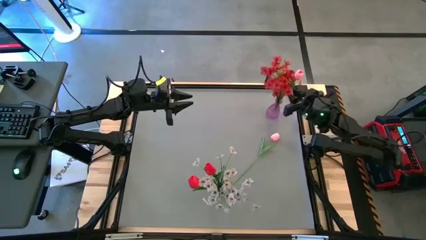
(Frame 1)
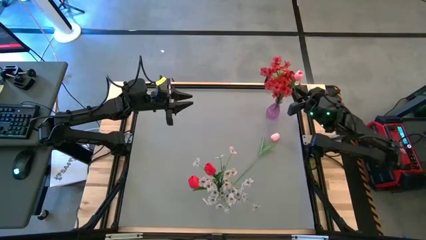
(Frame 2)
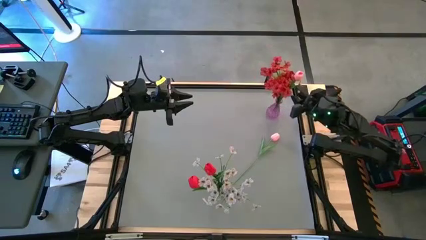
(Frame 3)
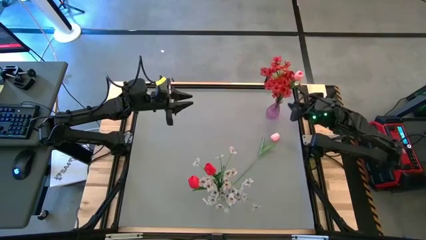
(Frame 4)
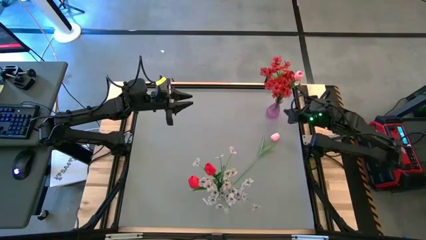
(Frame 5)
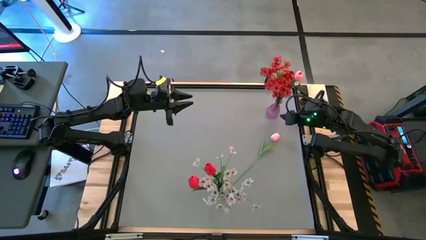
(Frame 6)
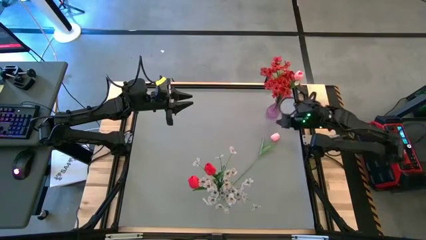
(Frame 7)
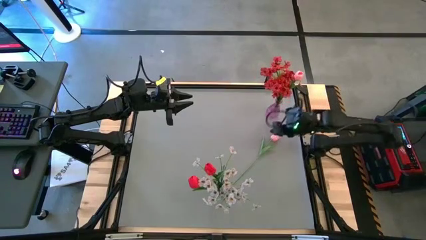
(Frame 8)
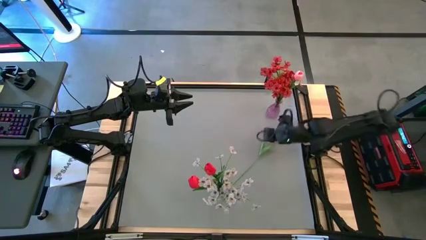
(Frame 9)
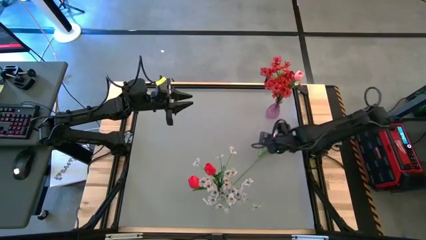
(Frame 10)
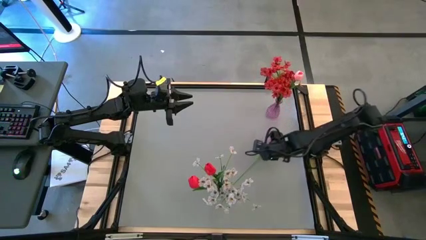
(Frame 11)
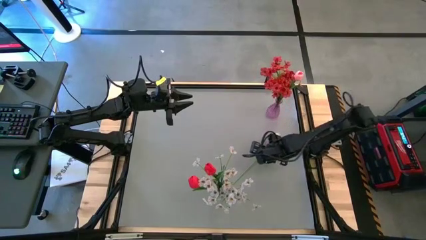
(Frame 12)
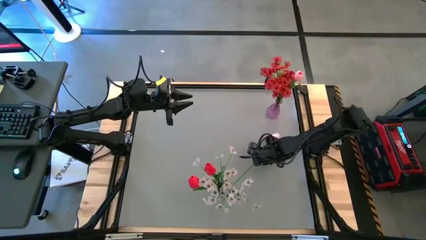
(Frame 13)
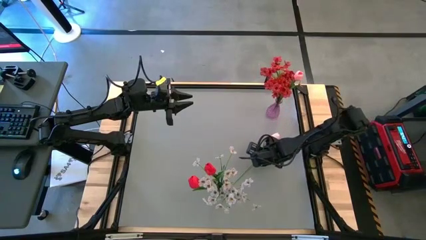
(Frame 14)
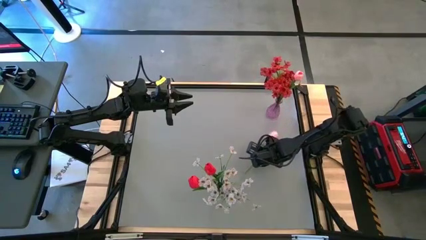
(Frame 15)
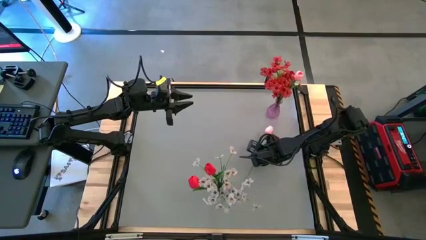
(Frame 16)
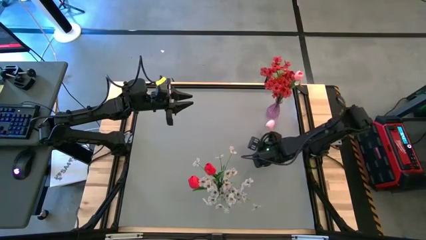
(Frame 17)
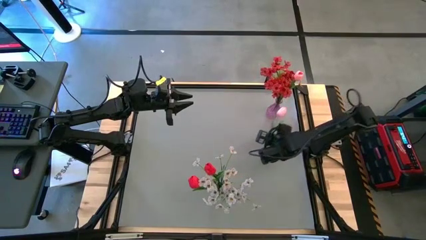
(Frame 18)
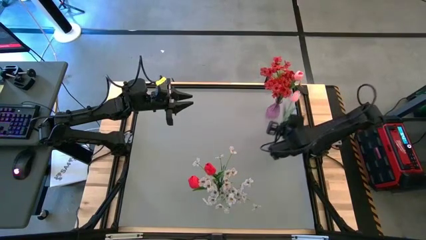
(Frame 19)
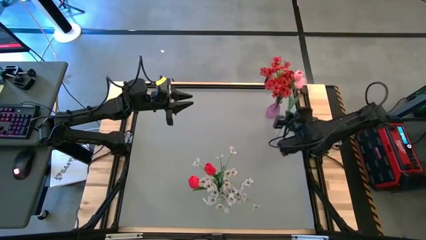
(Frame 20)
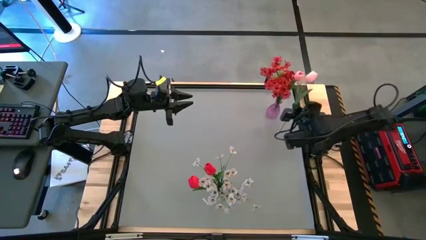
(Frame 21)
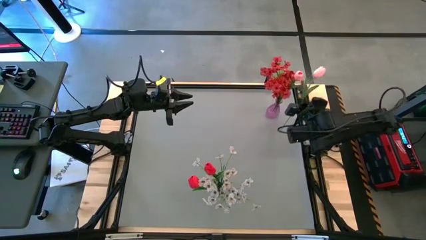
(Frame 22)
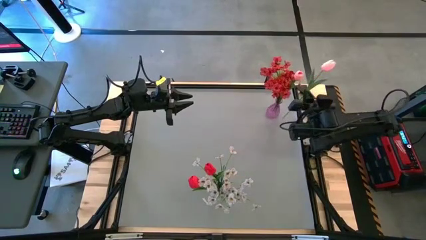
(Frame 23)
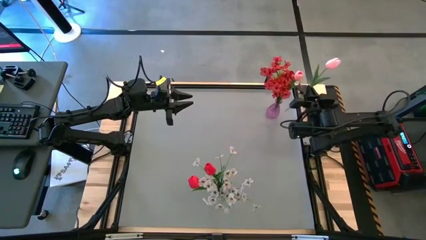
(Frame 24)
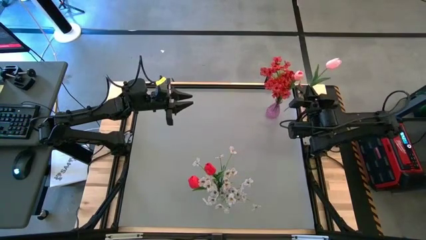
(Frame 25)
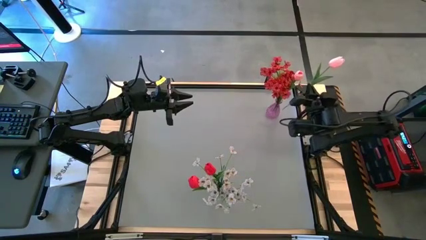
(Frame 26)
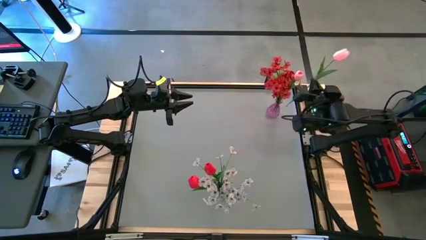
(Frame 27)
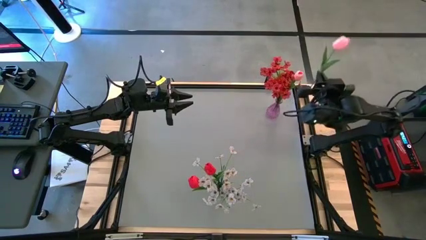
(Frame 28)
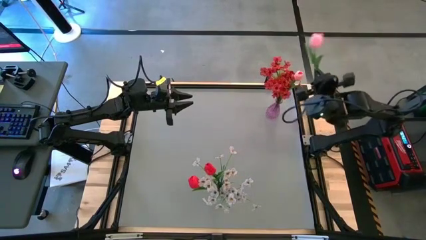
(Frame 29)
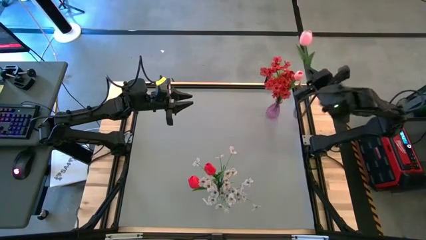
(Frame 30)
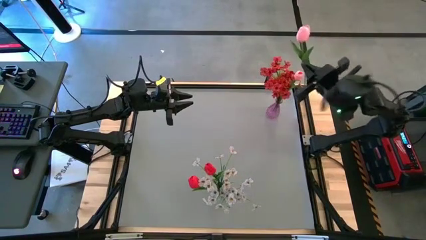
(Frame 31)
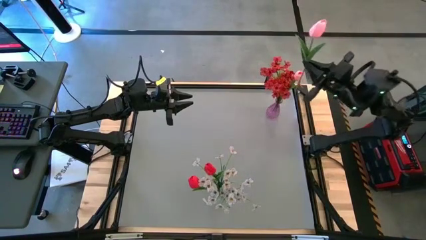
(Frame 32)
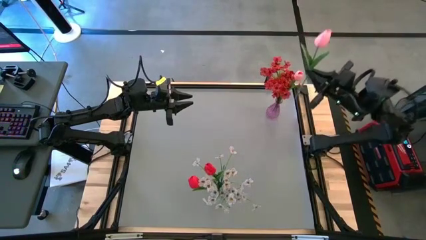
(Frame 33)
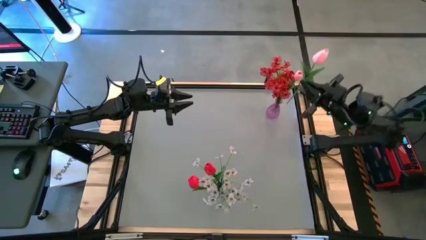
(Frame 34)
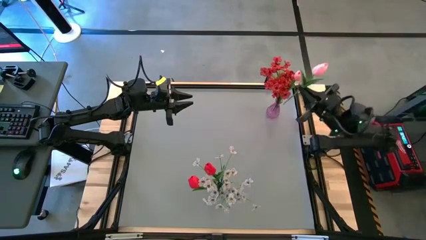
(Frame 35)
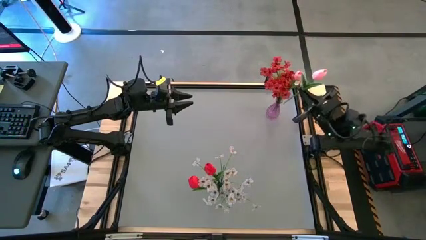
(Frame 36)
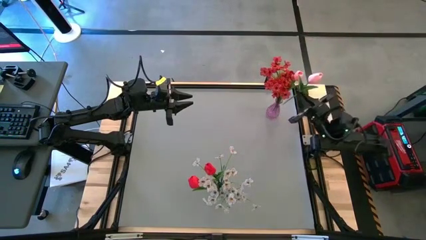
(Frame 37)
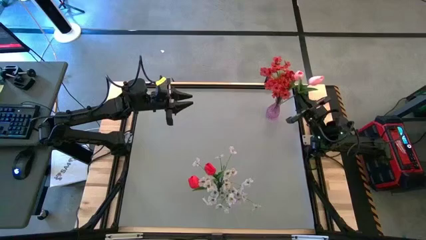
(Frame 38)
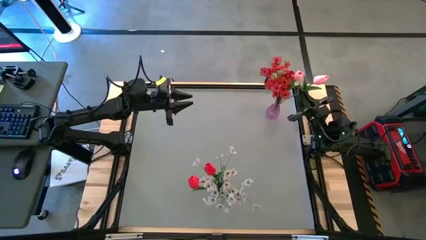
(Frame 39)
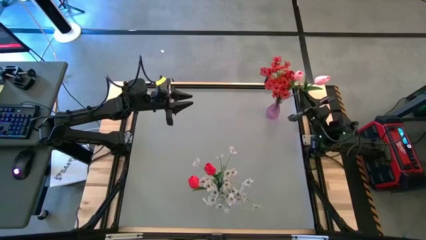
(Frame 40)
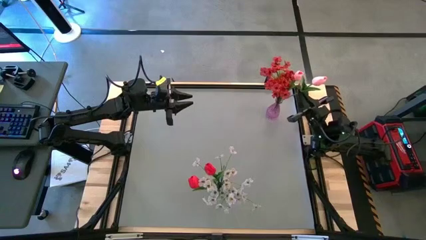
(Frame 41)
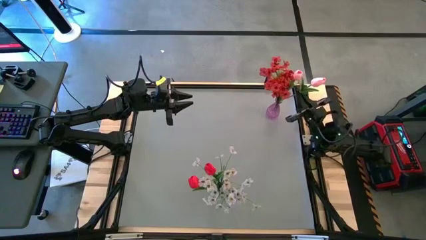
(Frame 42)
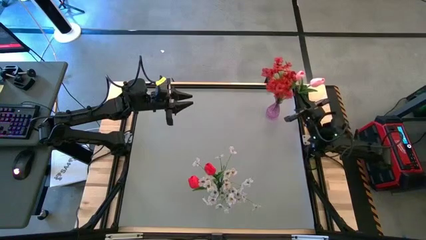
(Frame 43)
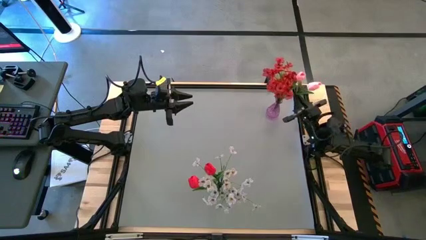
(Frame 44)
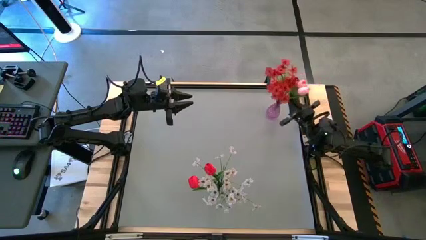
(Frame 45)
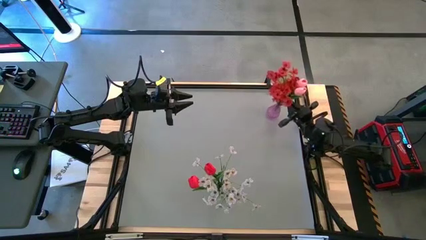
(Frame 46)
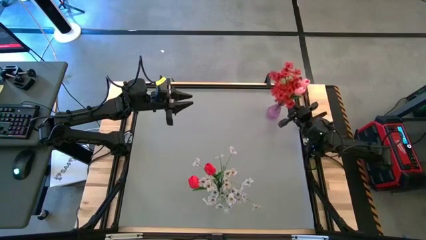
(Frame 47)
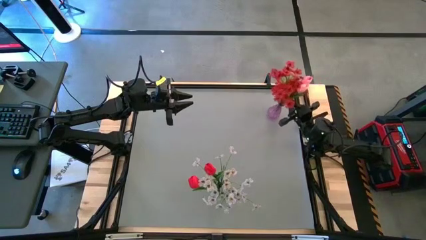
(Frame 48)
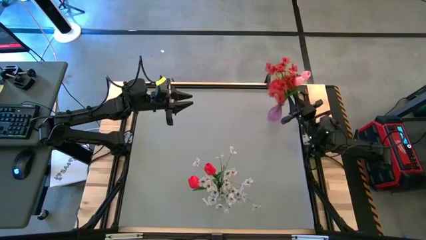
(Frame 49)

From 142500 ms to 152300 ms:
Task: Sort flowers into vase by color
Put the pink flower into the violet vase

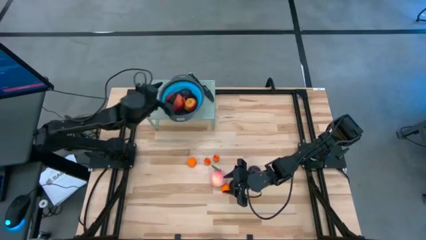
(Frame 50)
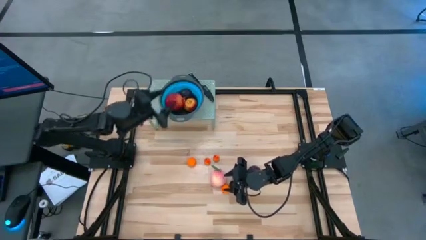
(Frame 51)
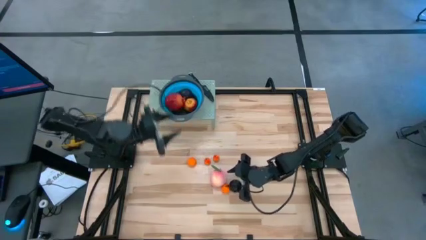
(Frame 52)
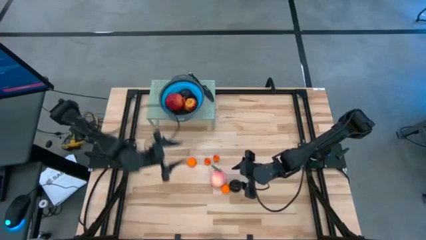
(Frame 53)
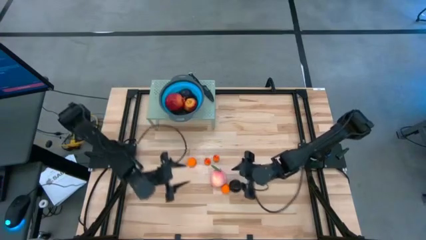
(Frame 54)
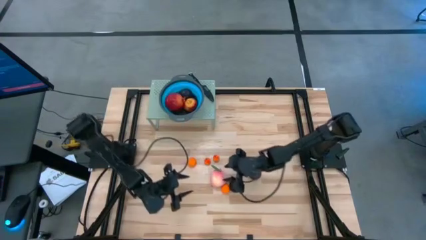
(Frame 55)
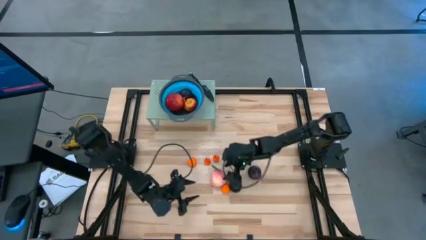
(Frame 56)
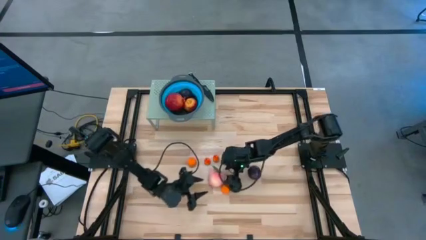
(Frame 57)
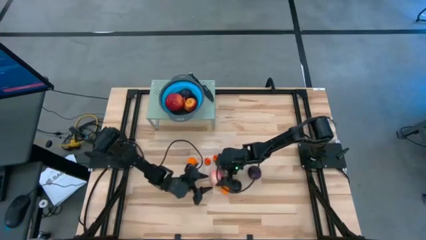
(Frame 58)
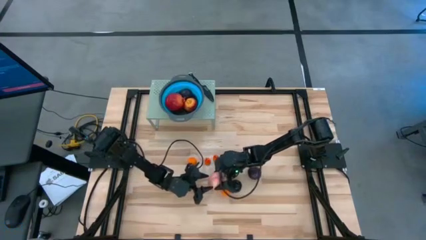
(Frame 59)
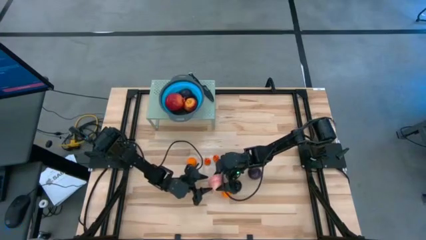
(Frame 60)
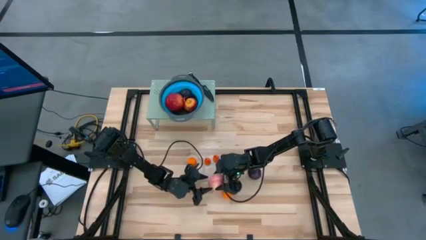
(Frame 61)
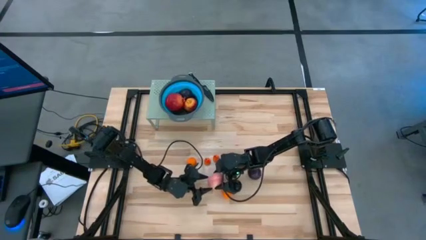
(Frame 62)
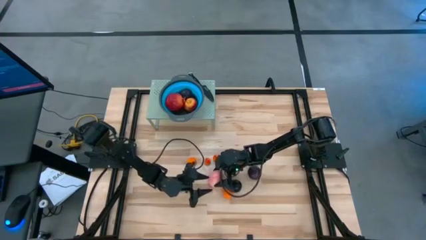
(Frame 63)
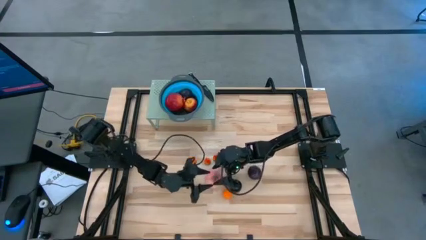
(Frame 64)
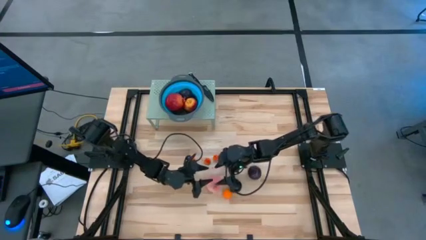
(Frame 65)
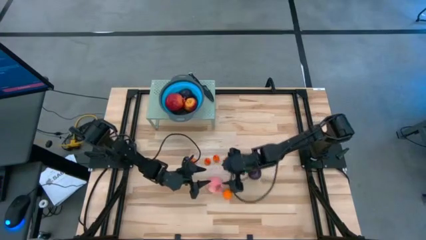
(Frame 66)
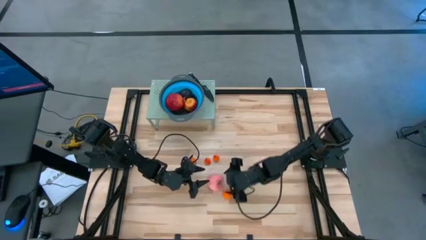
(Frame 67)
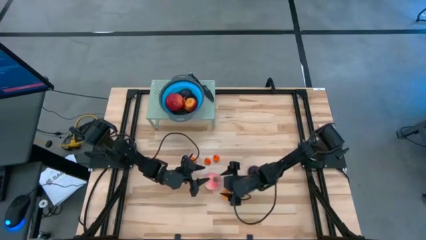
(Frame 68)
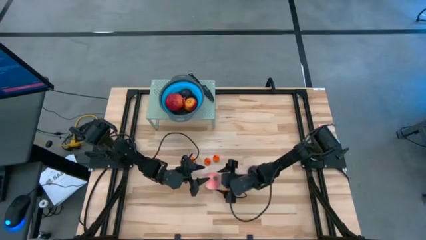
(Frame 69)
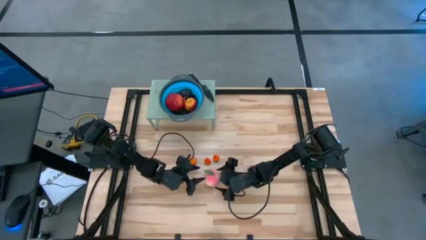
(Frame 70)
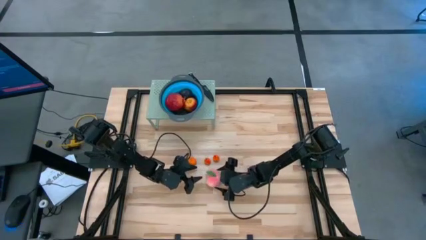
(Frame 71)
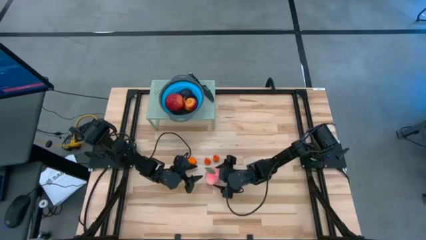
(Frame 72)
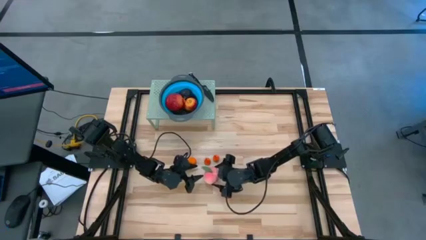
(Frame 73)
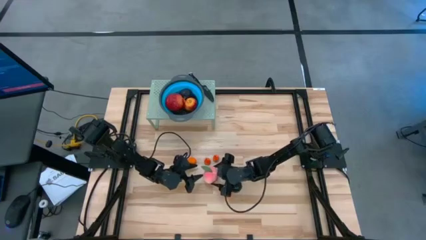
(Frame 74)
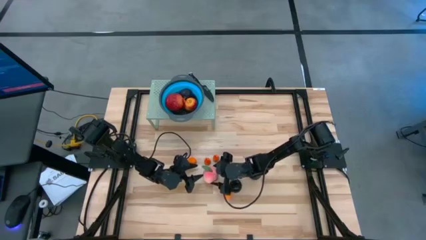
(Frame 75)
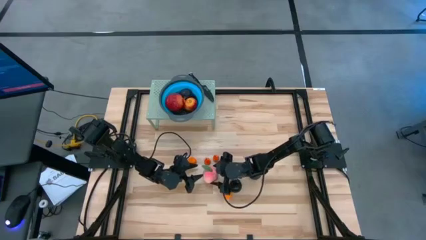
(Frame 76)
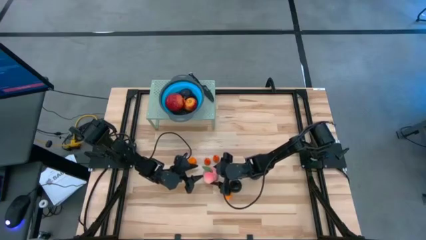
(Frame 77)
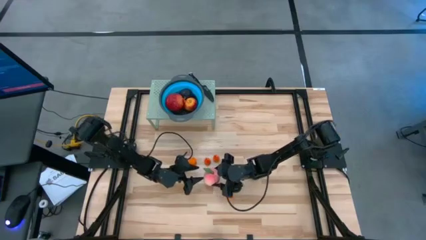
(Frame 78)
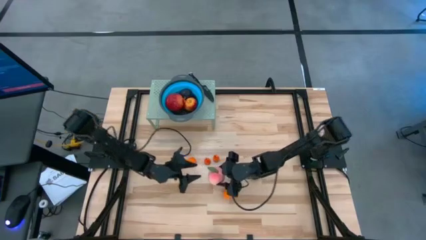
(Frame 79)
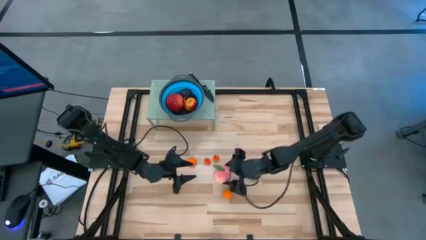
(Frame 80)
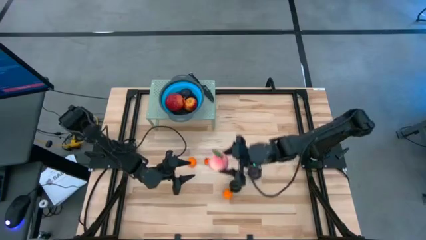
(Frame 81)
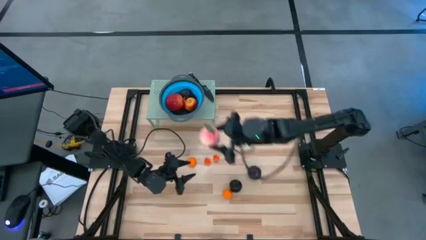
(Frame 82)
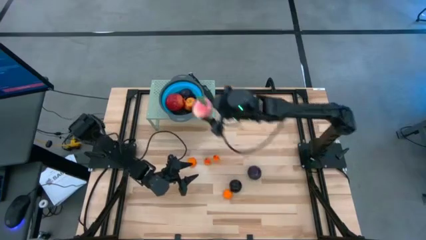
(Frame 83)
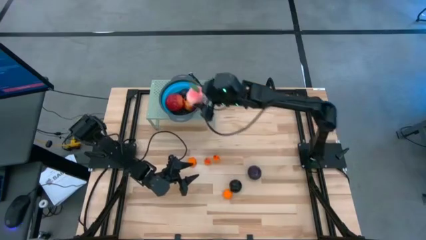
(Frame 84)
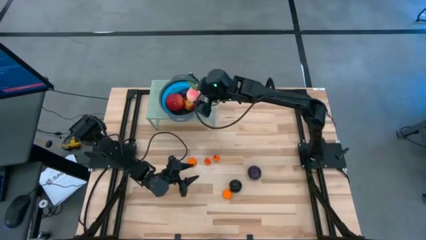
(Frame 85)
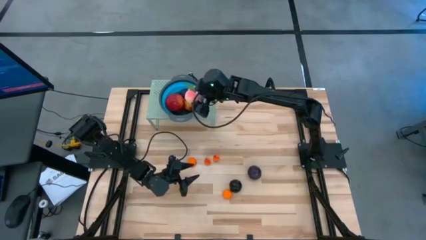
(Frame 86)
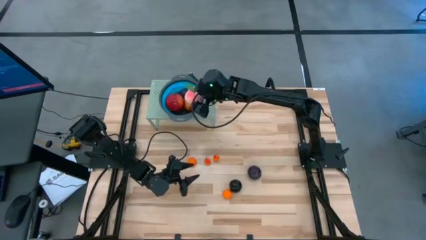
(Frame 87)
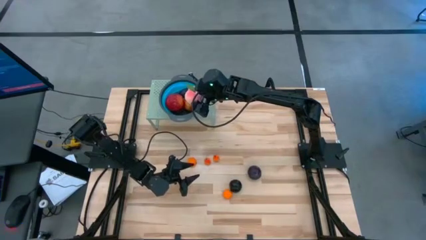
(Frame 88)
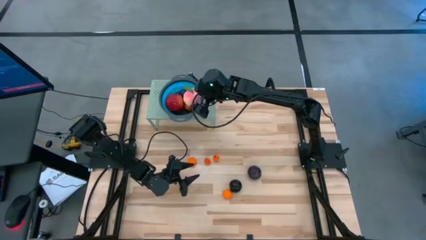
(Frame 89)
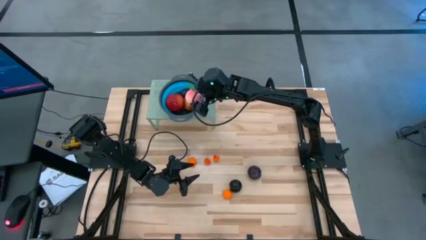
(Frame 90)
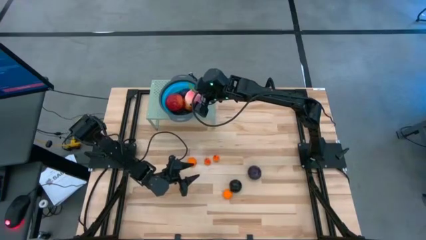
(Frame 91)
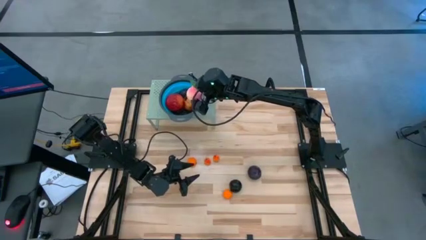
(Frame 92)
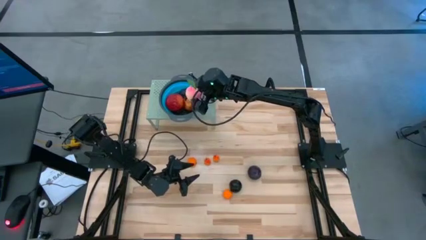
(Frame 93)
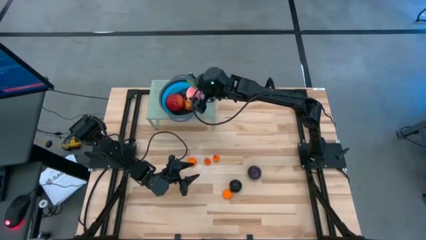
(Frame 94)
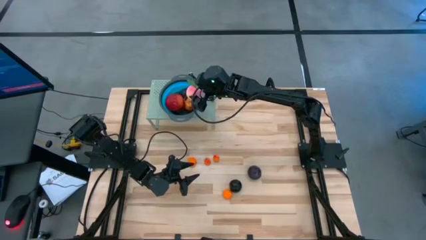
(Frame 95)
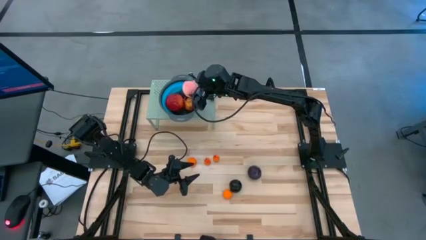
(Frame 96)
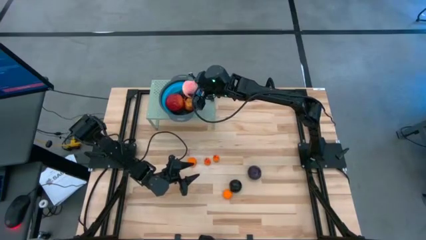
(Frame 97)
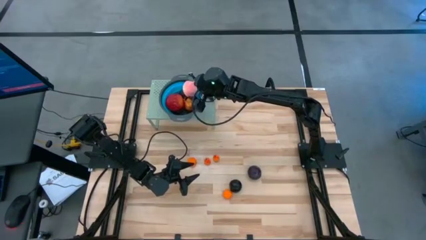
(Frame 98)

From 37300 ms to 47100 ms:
Task: Pick & Place Fruit
Put the pink peach into the blue strainer bowl on the shelf
